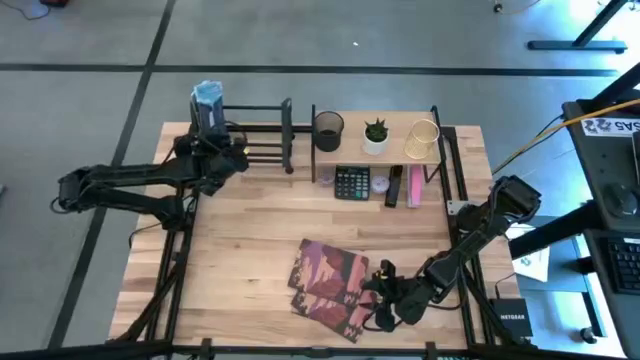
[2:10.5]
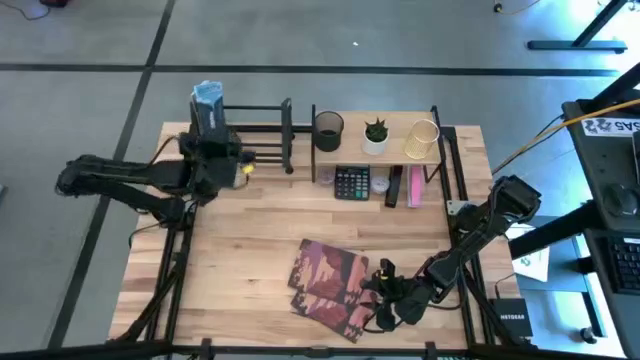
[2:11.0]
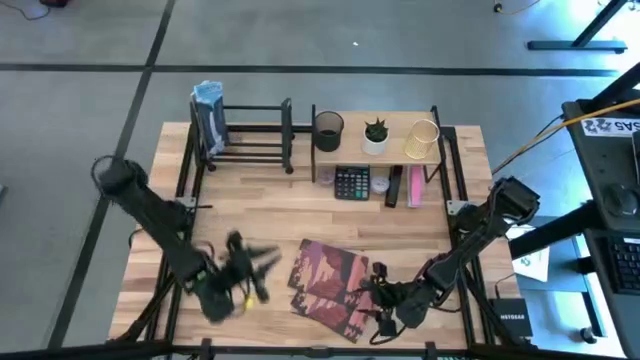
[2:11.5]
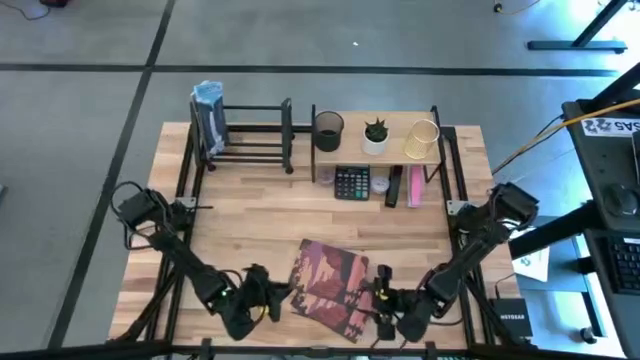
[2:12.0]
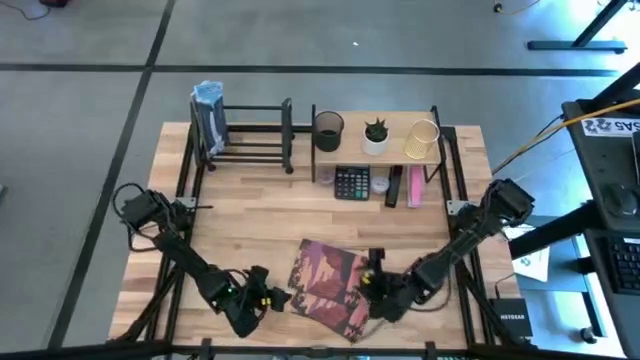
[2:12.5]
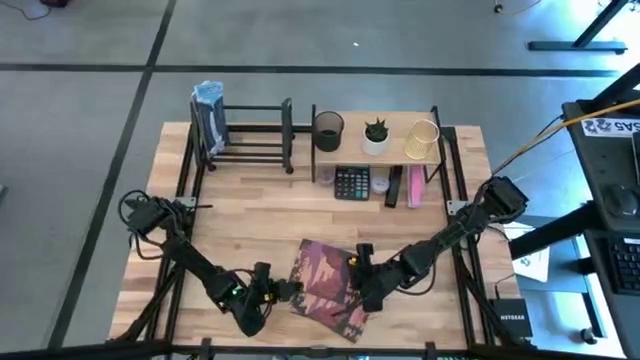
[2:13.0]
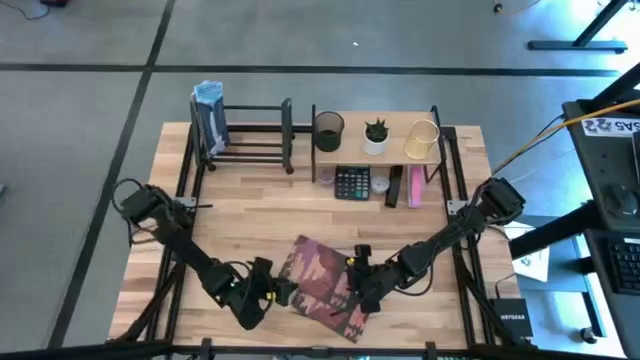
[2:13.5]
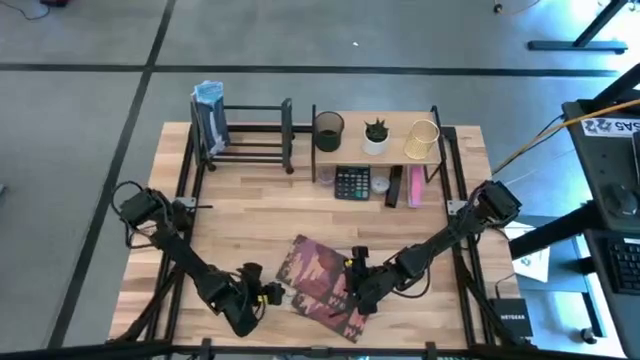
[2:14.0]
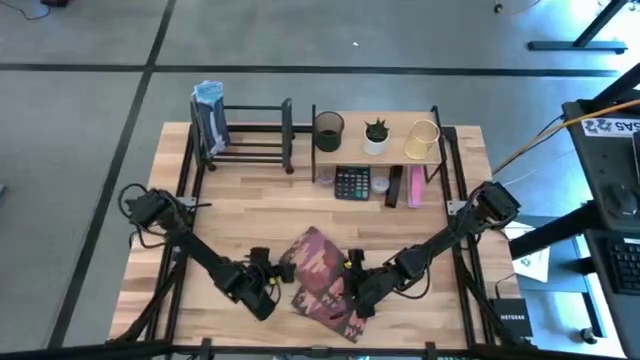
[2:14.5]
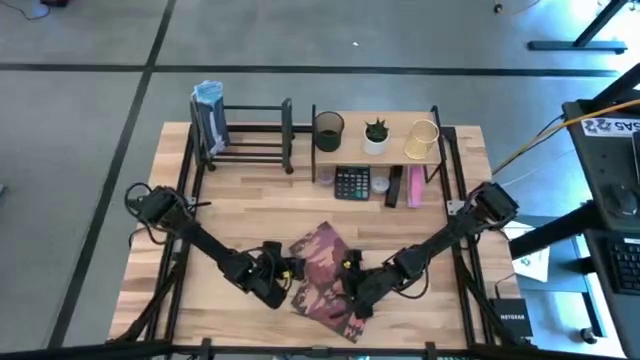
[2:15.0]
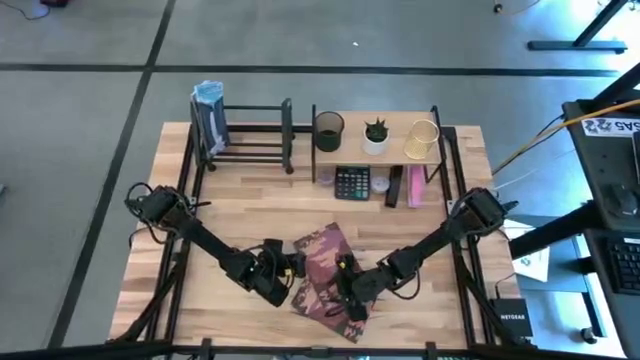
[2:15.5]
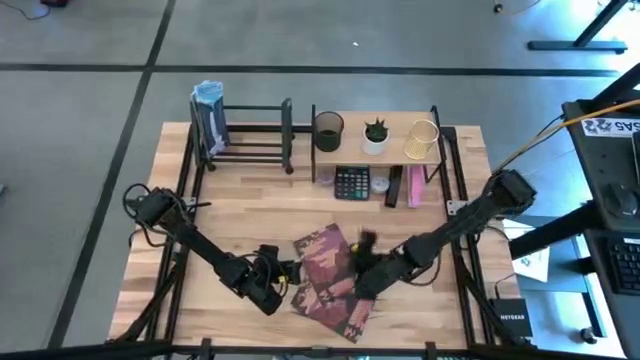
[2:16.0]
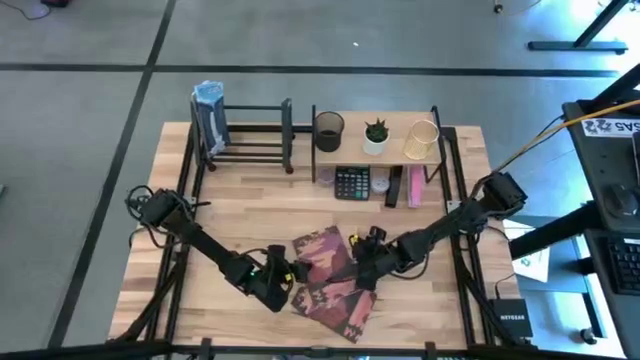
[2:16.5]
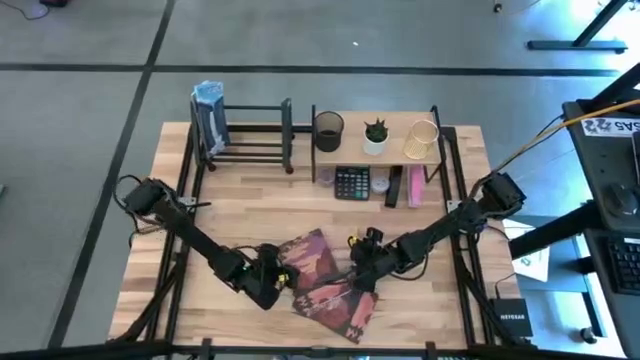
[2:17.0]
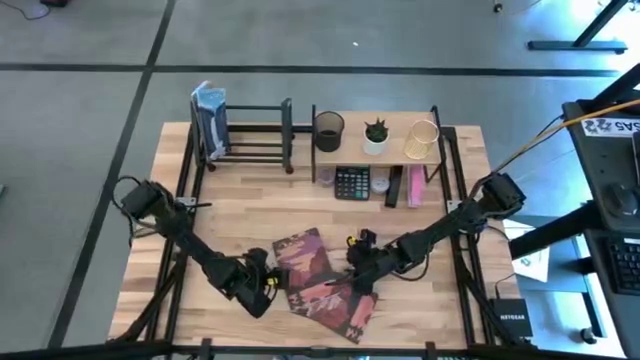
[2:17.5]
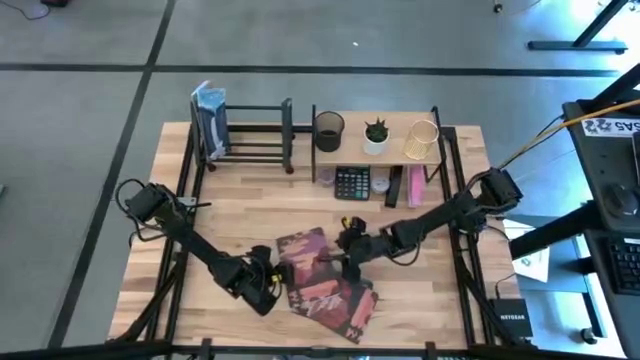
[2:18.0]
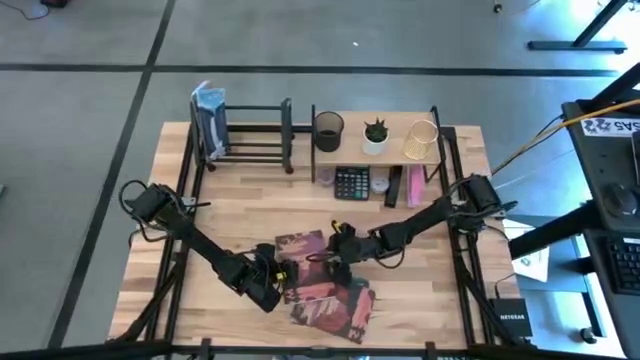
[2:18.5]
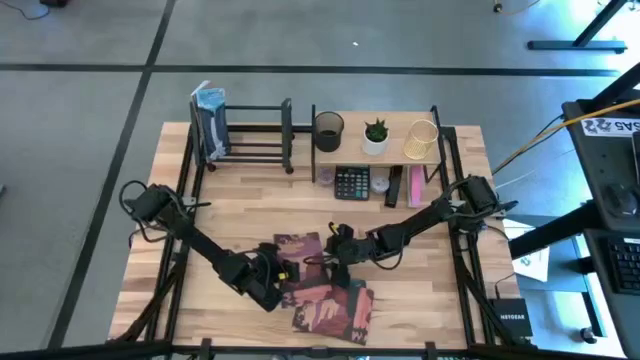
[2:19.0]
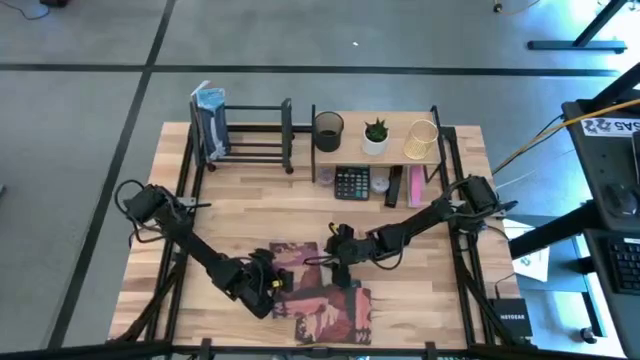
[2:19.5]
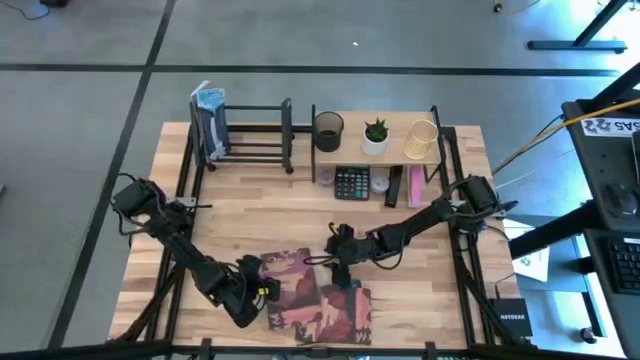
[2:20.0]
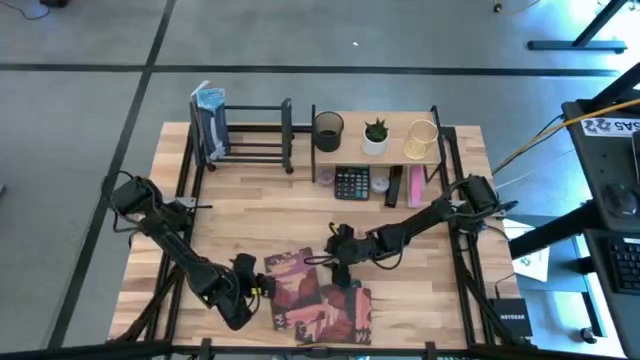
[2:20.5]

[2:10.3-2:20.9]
Task: Stock shelves
Put the red book on the book shelf

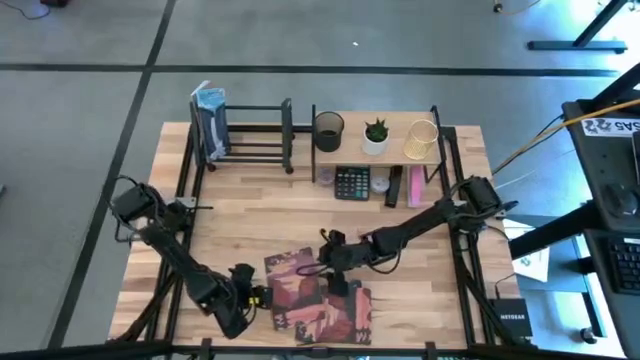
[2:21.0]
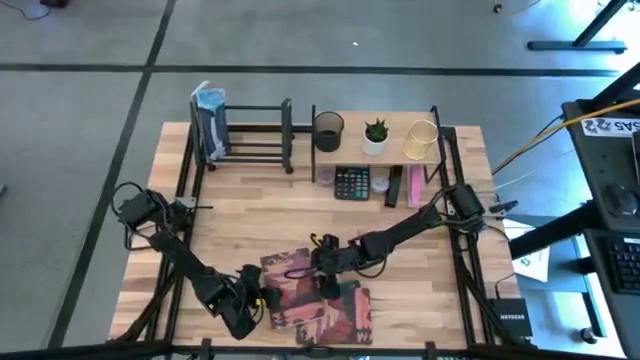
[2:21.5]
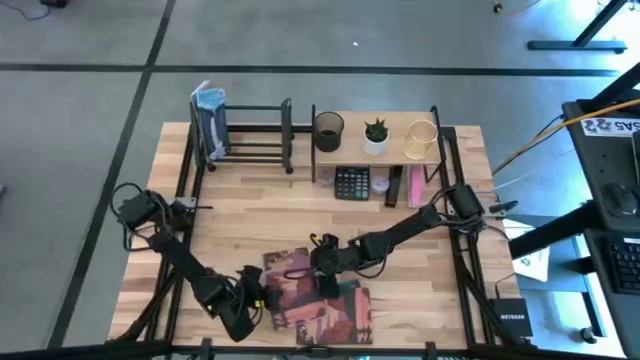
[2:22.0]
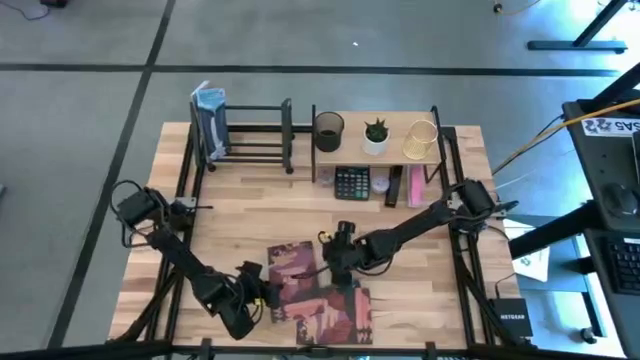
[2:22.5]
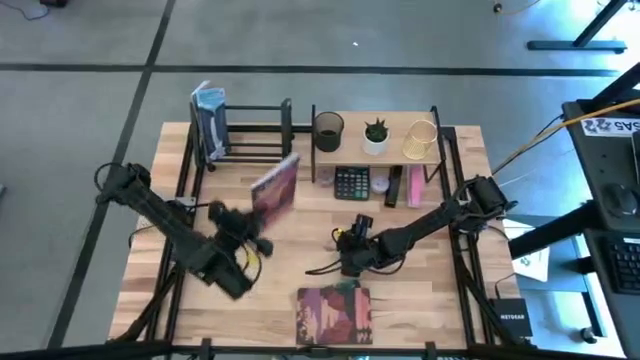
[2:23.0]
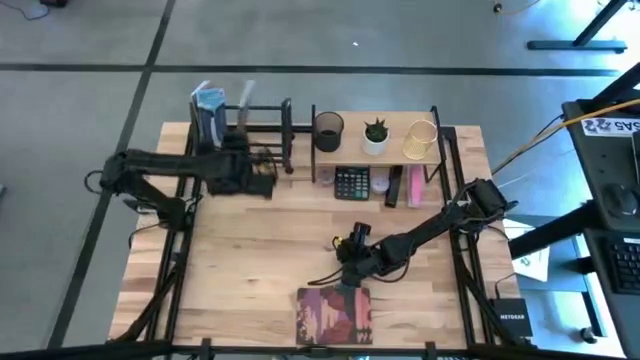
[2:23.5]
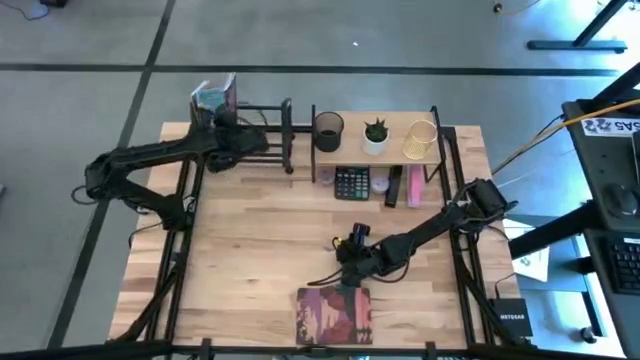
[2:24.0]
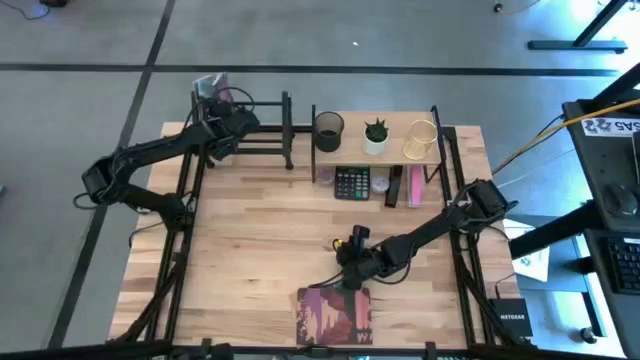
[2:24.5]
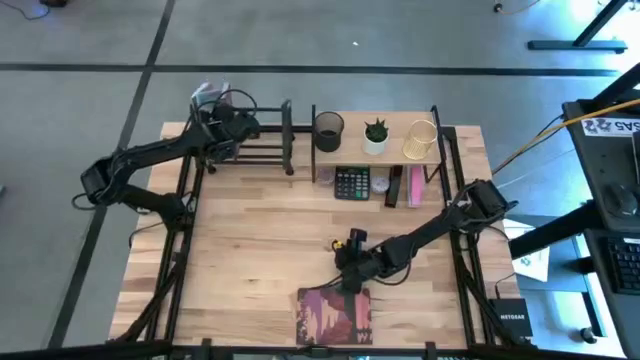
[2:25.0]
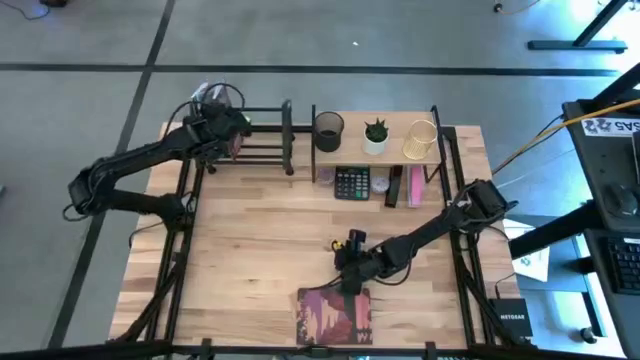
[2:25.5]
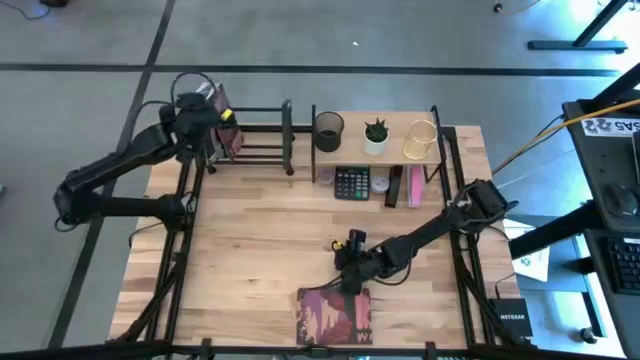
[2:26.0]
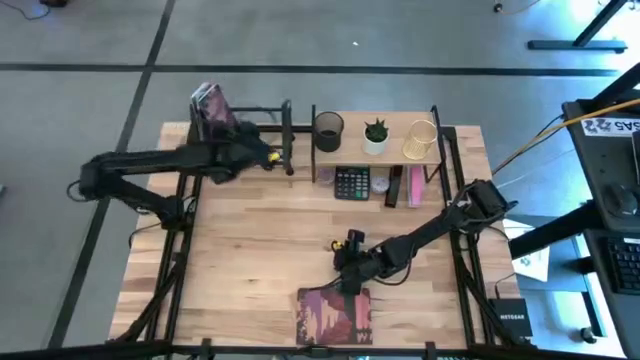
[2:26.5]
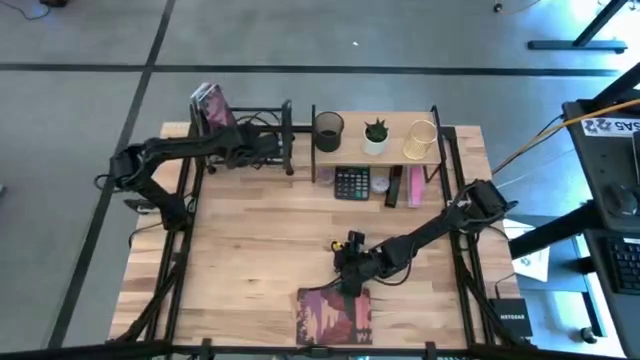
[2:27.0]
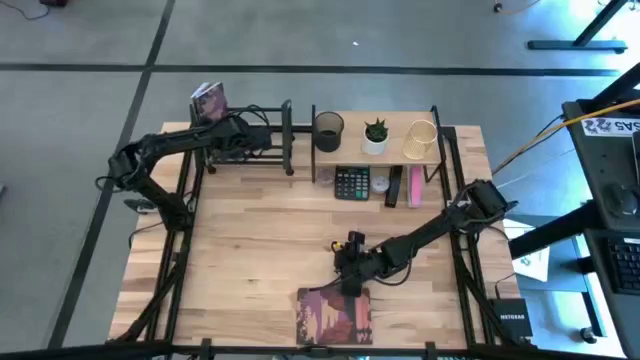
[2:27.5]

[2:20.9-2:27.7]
Put the red book on the book shelf

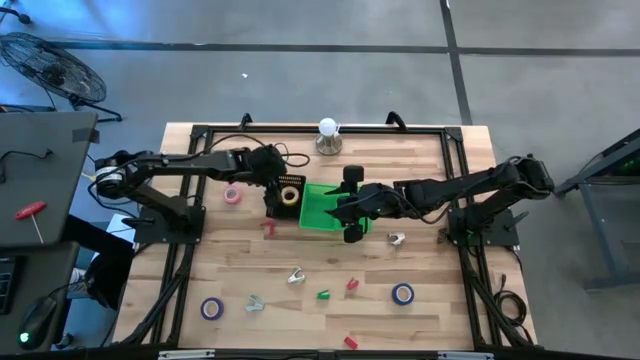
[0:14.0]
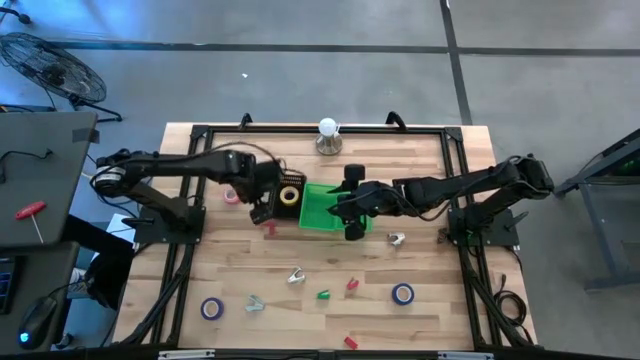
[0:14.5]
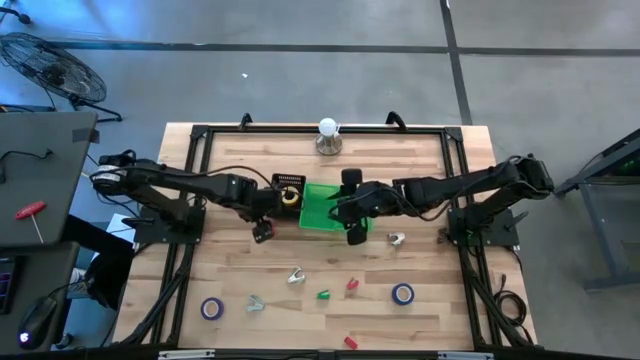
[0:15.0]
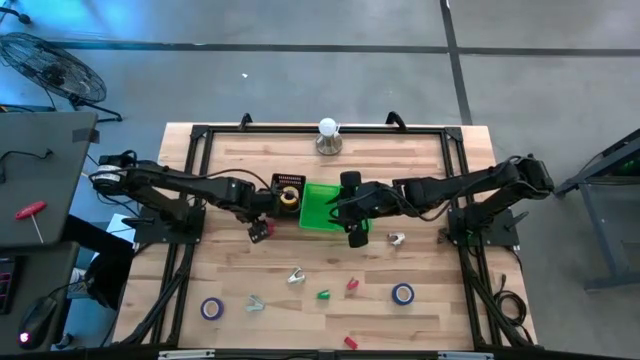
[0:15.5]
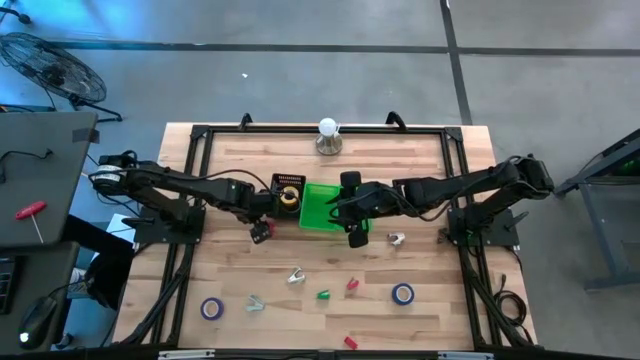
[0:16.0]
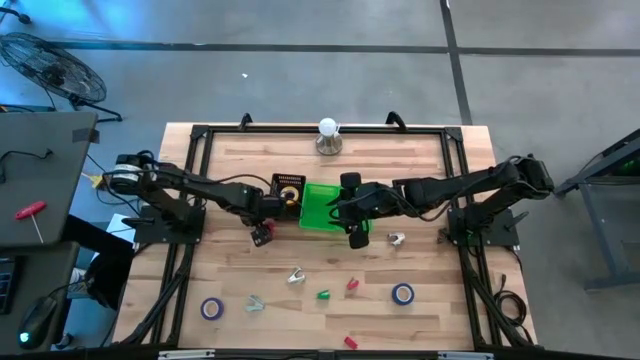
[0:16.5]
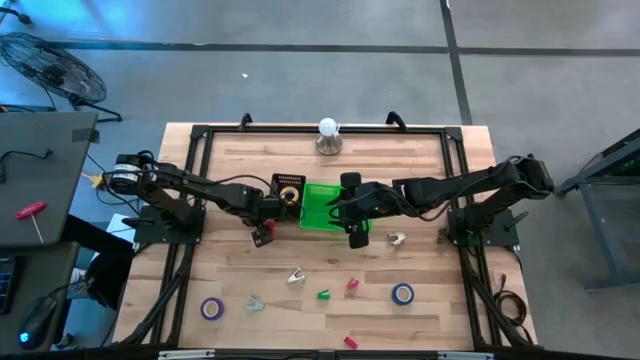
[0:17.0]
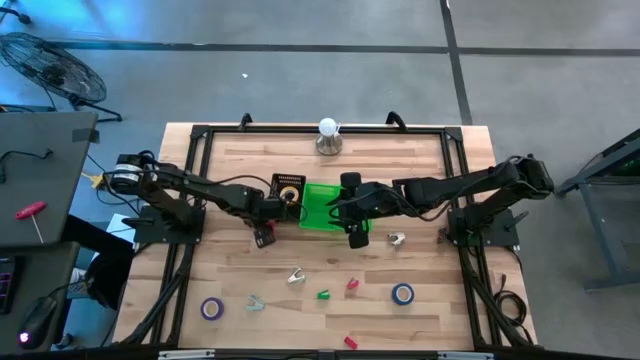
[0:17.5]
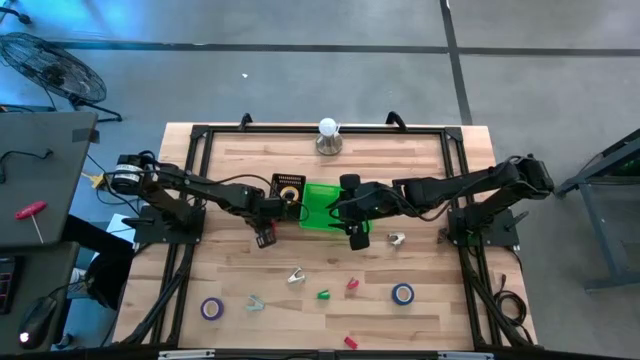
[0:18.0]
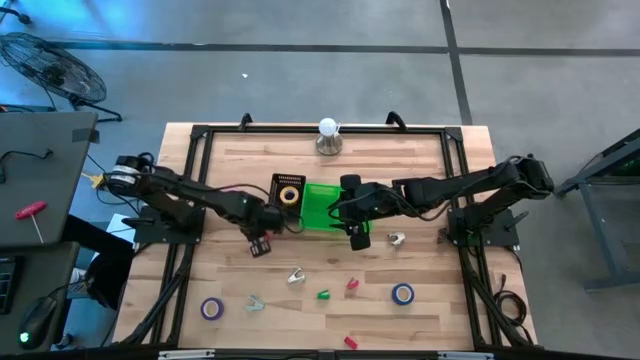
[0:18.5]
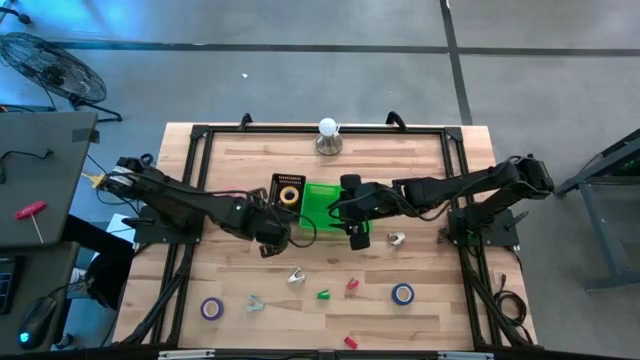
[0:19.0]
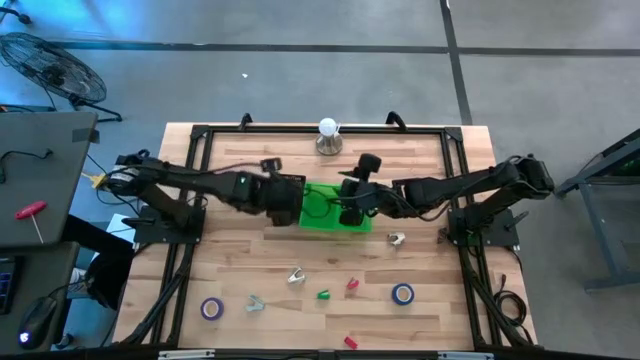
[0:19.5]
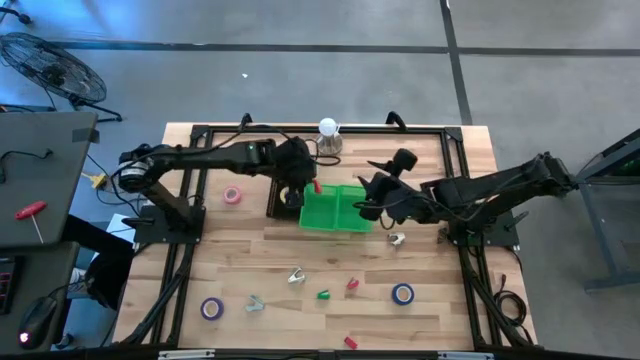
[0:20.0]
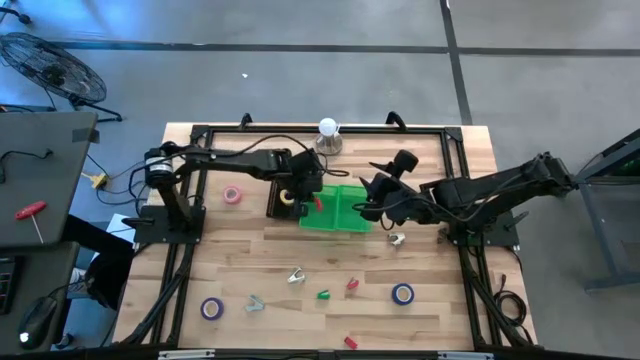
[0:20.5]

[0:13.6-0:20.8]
Task: Pick and place Stapler, Stapler remover, tape
Put the top red stapler into the left green bin
